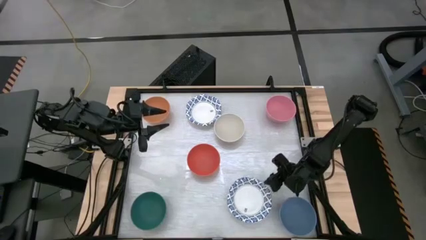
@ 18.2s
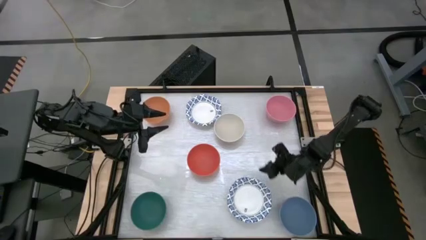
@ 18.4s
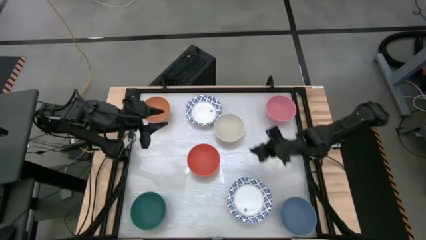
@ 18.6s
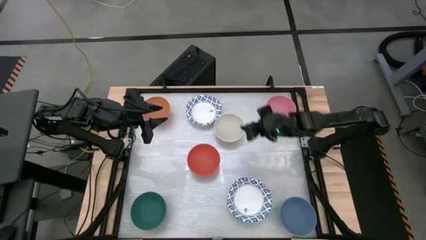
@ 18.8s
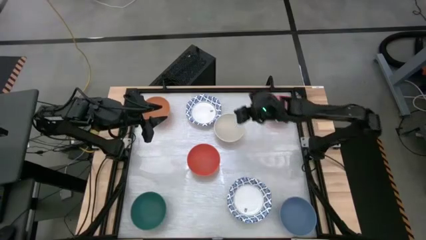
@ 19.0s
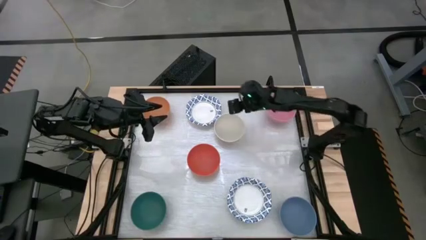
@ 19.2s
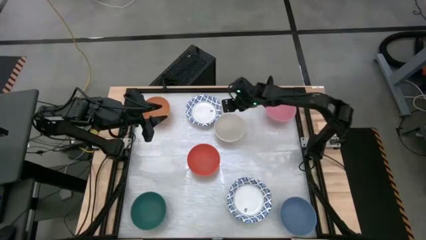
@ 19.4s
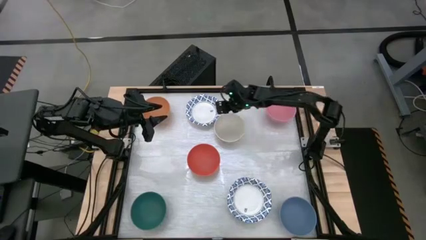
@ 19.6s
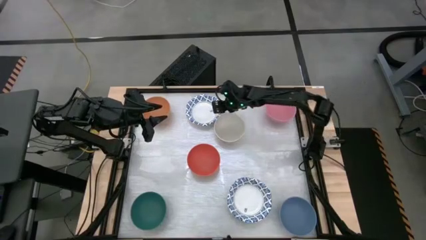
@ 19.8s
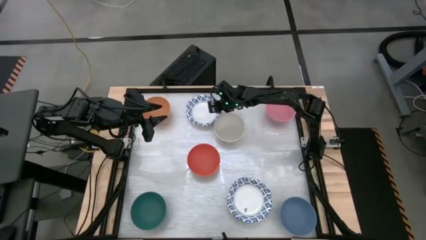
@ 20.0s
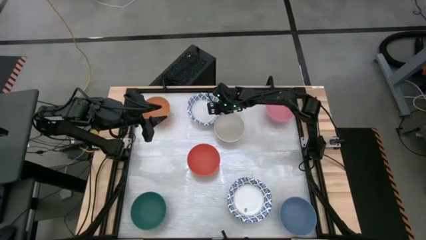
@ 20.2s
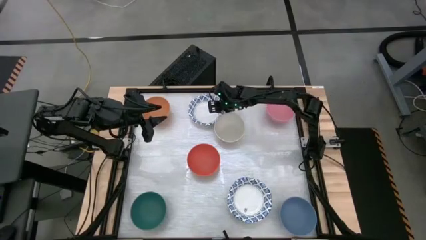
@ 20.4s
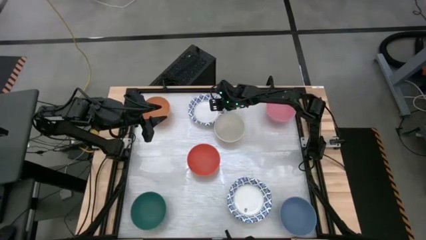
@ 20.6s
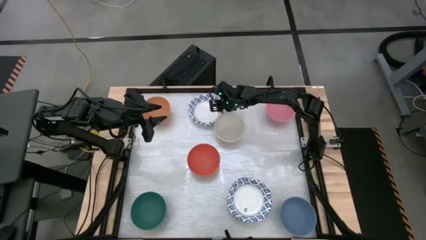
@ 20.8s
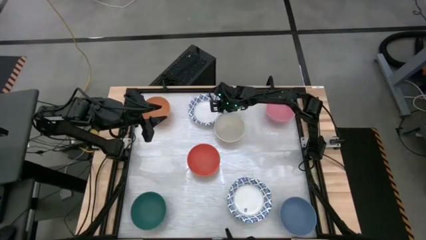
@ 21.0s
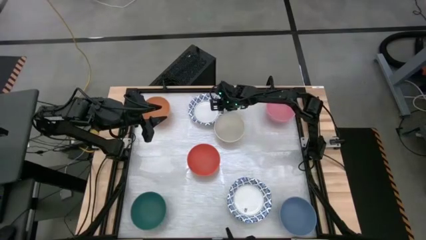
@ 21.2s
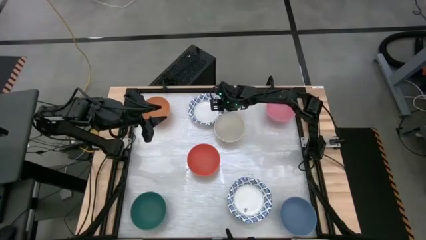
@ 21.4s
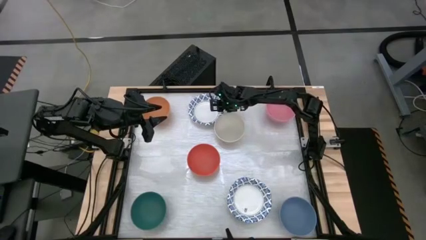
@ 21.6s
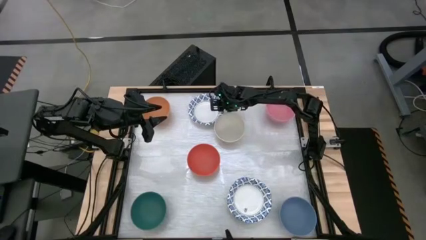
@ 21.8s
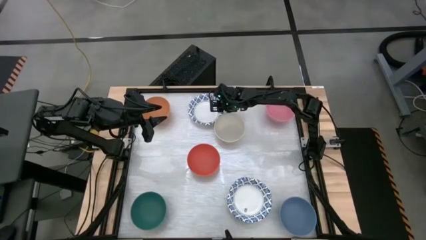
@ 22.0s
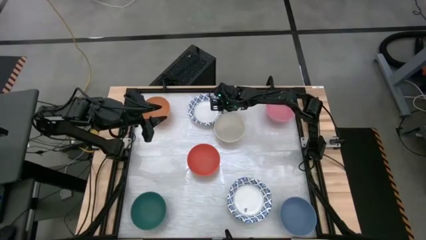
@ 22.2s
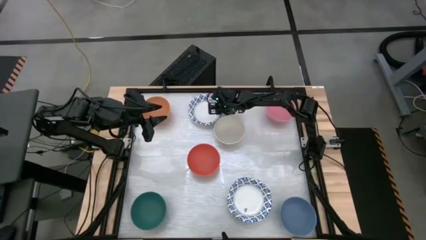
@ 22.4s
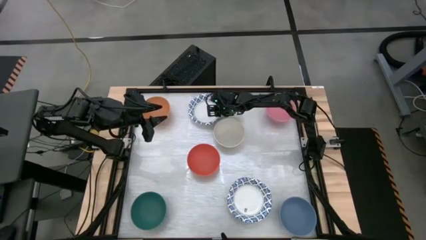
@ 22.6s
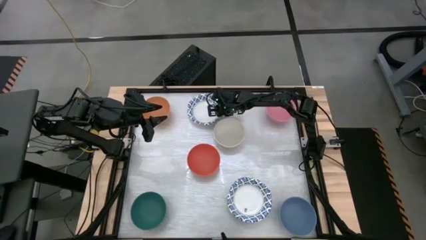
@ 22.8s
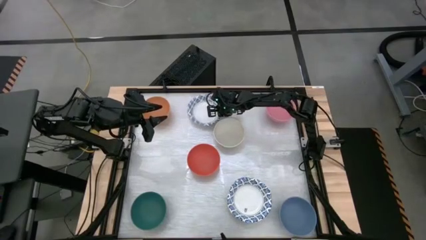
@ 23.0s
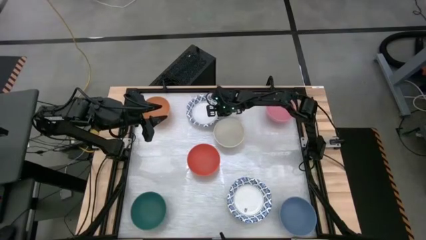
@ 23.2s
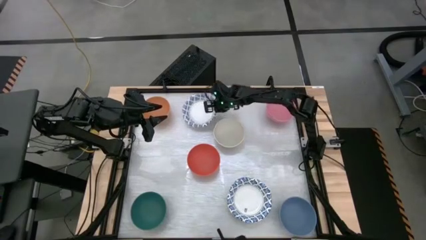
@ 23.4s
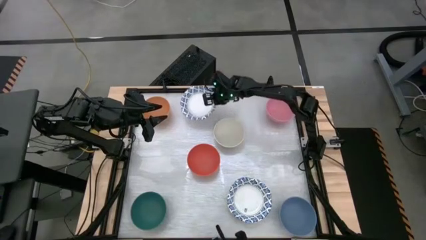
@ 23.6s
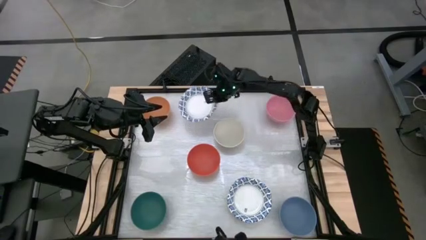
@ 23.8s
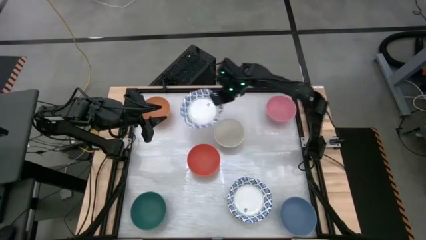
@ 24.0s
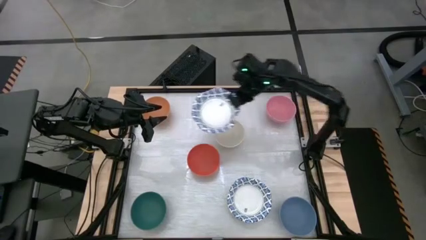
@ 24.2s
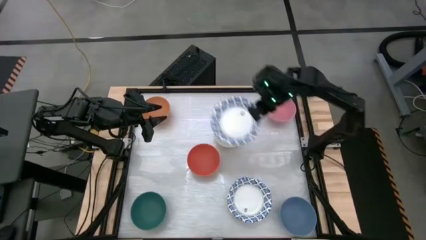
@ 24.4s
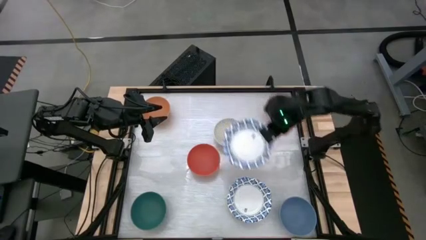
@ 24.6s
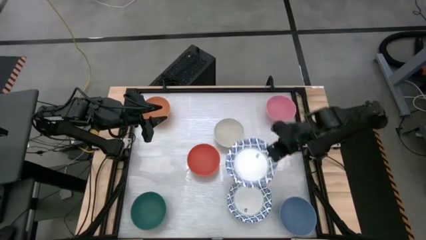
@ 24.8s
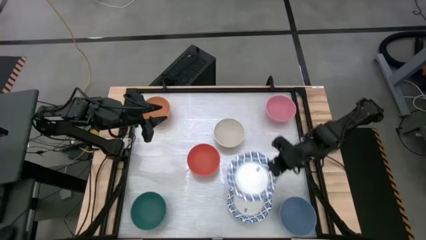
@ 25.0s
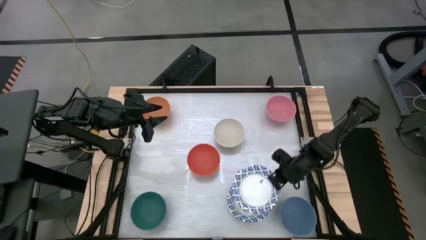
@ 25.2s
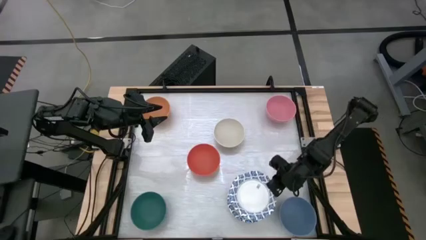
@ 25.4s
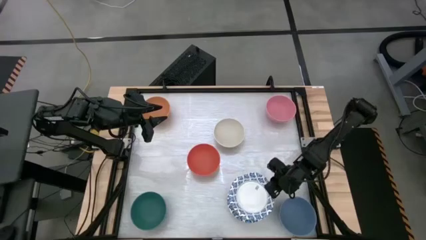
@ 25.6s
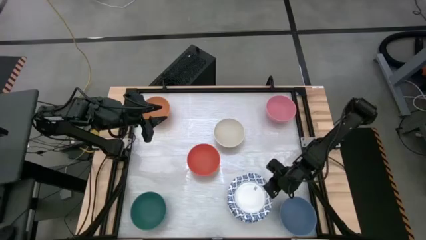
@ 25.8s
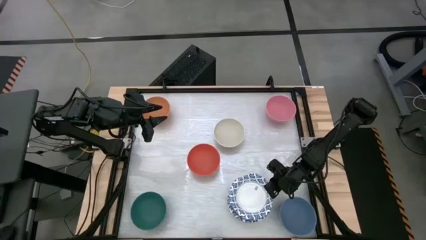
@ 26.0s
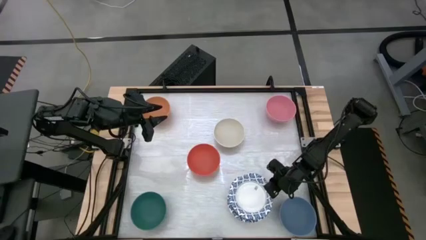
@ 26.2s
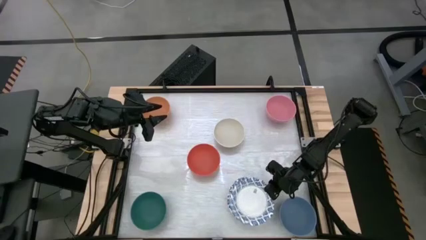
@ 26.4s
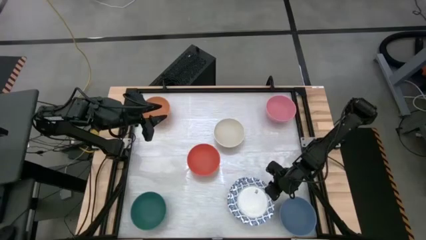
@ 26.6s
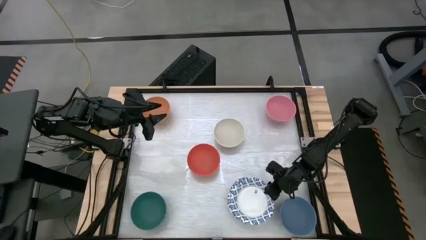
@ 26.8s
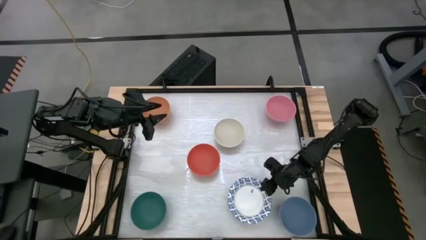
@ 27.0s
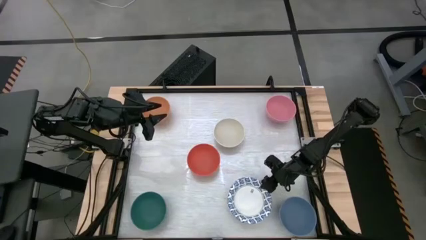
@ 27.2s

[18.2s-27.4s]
Stack the white patterned bowl on top of the white patterned bowl

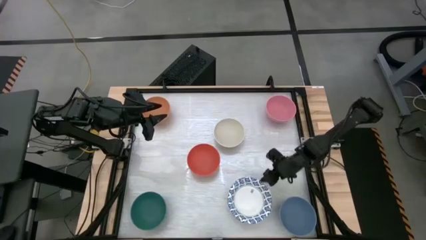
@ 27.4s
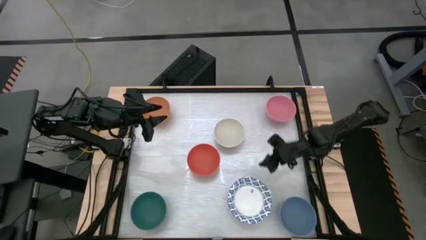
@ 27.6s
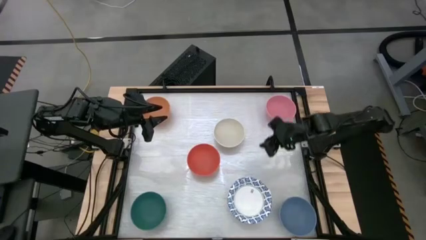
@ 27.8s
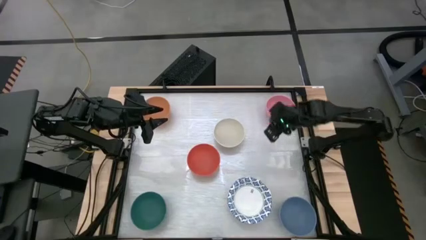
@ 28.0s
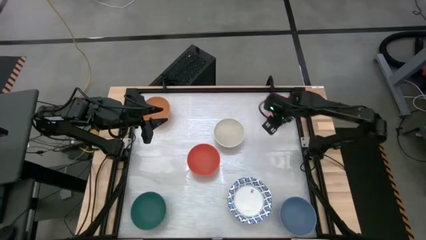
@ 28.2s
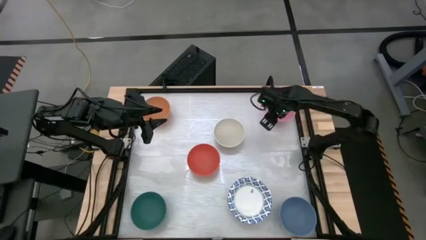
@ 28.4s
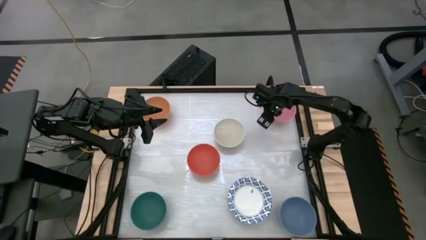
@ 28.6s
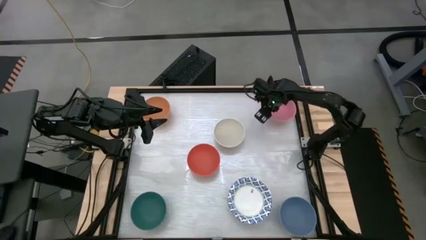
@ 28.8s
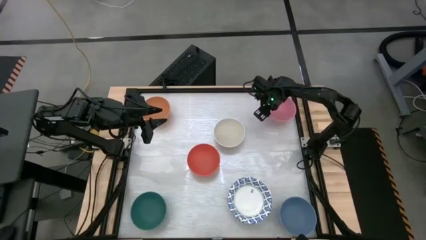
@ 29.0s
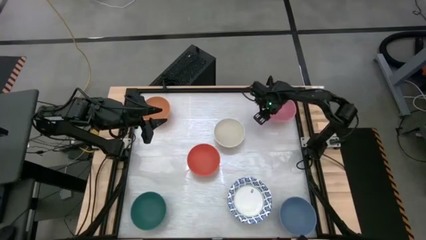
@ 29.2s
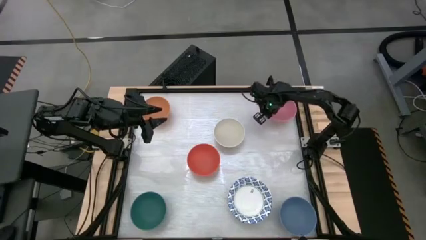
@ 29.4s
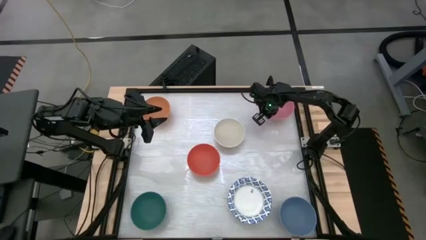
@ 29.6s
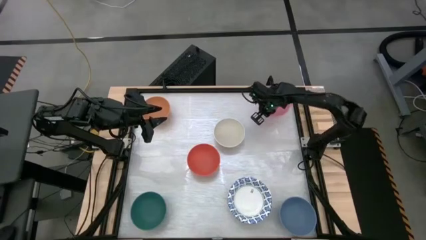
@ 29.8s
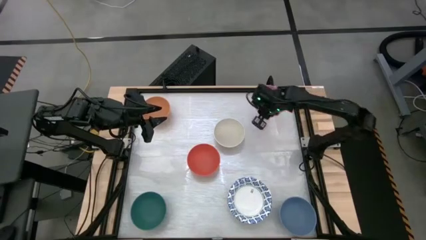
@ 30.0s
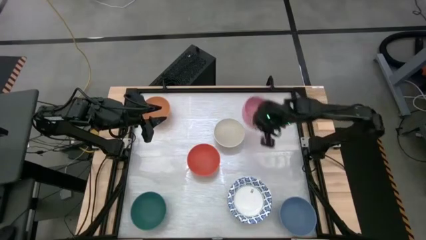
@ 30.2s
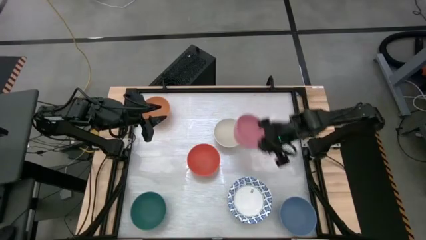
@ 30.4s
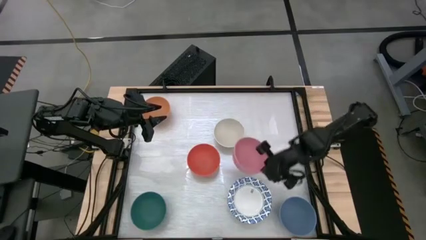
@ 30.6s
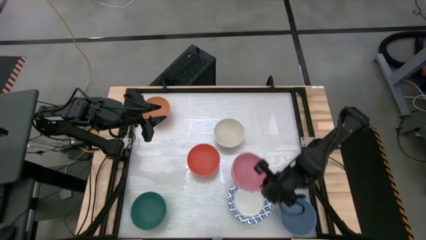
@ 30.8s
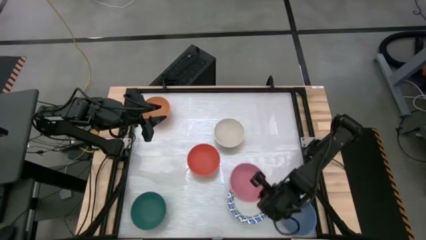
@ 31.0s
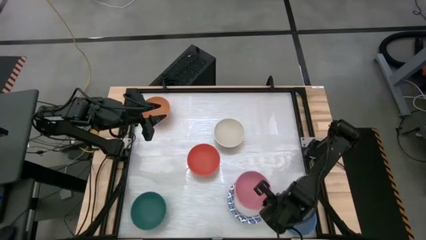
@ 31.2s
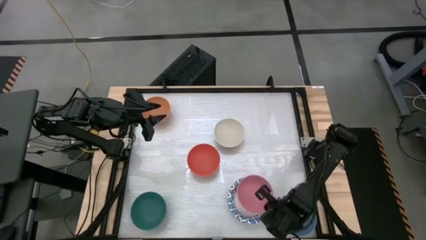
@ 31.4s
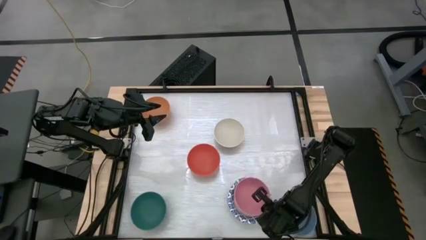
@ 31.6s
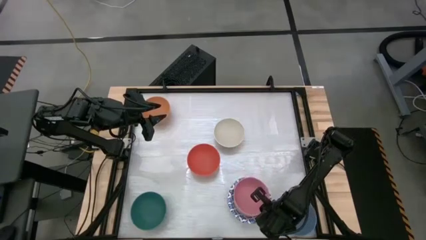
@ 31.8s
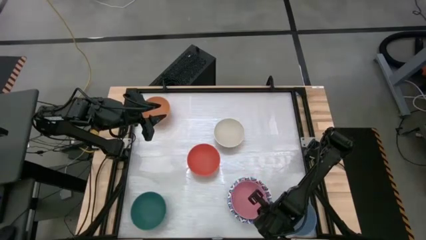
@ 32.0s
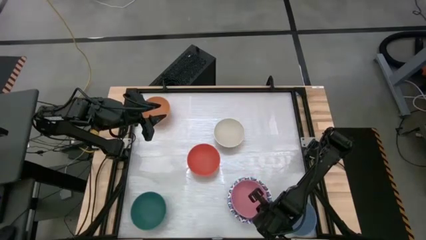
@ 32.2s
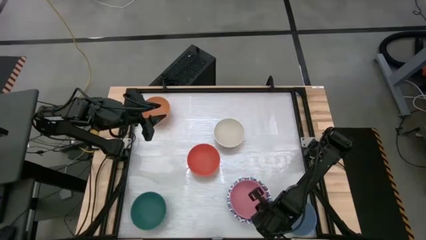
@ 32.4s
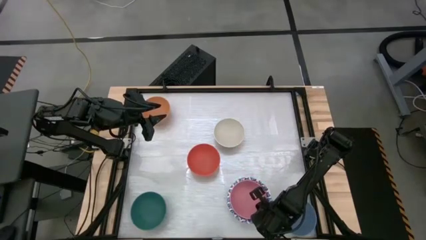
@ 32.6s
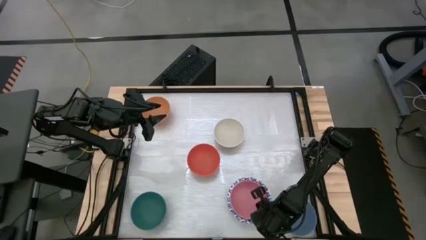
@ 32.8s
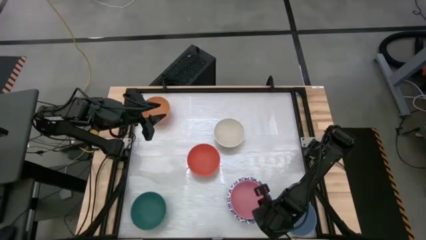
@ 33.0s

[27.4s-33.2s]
Stack the pink bowl on top of the white patterned bowl
